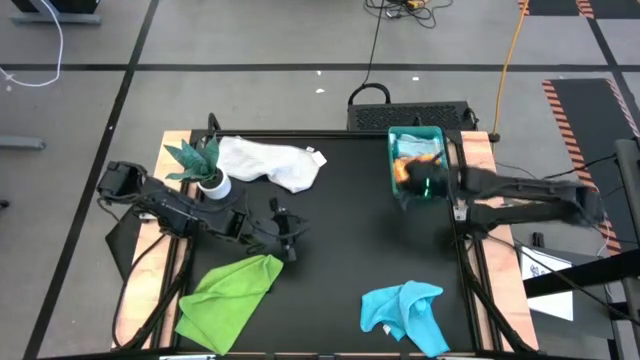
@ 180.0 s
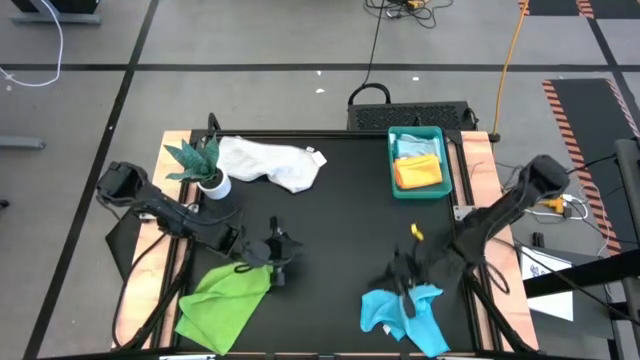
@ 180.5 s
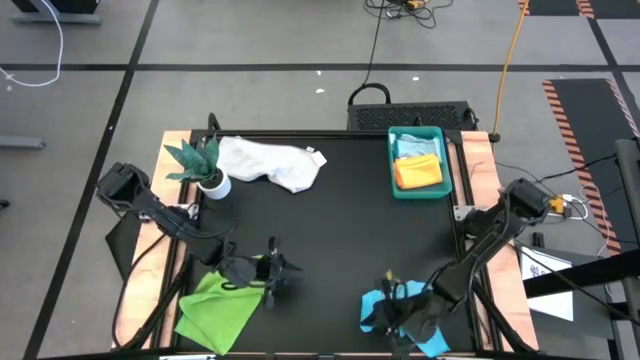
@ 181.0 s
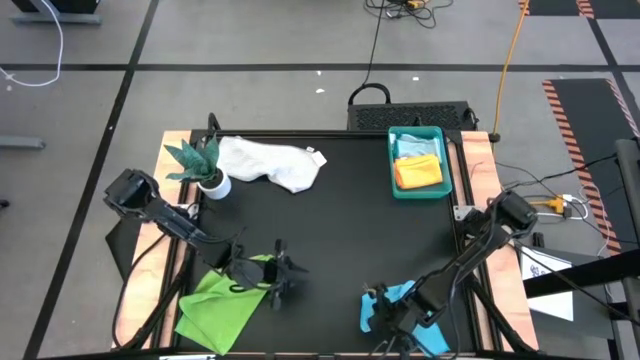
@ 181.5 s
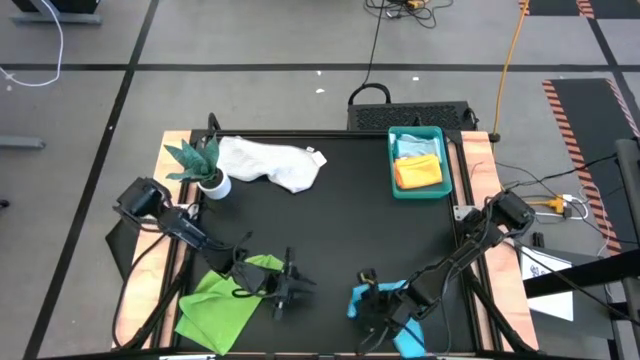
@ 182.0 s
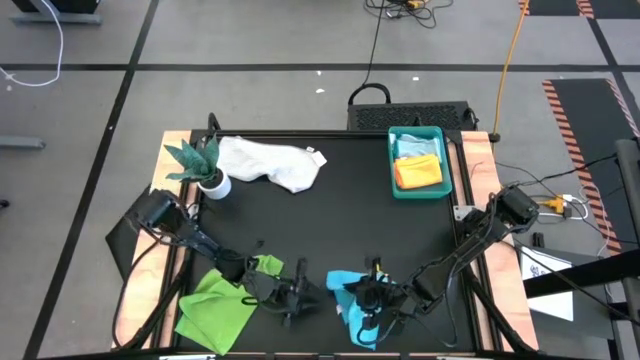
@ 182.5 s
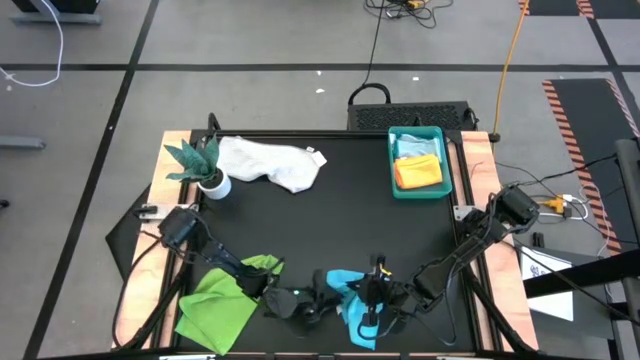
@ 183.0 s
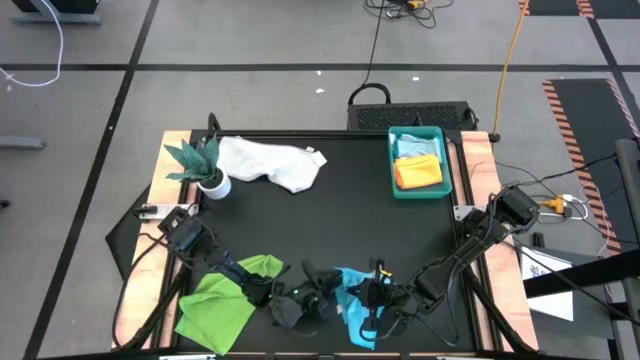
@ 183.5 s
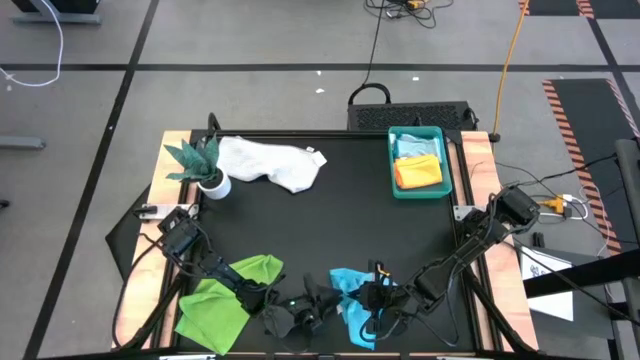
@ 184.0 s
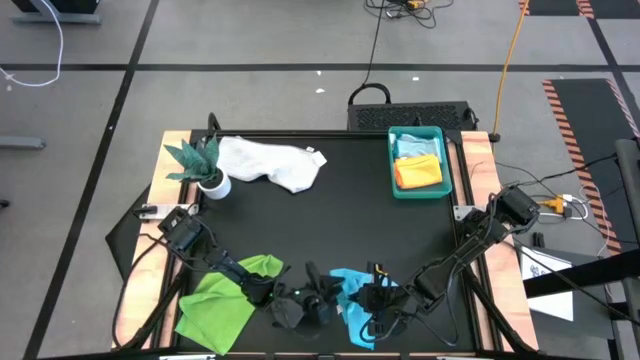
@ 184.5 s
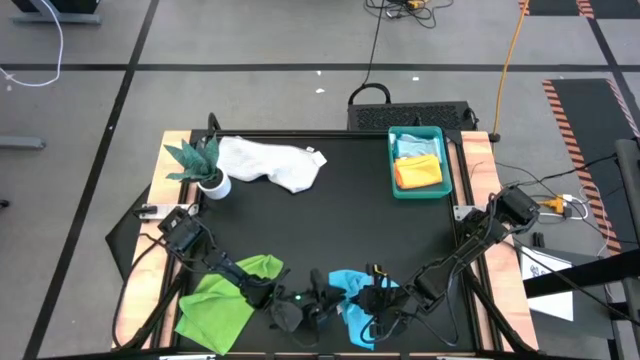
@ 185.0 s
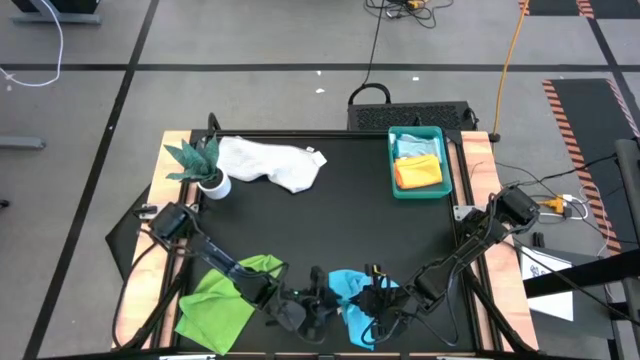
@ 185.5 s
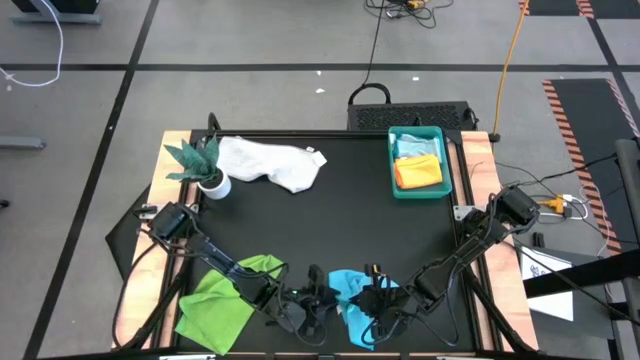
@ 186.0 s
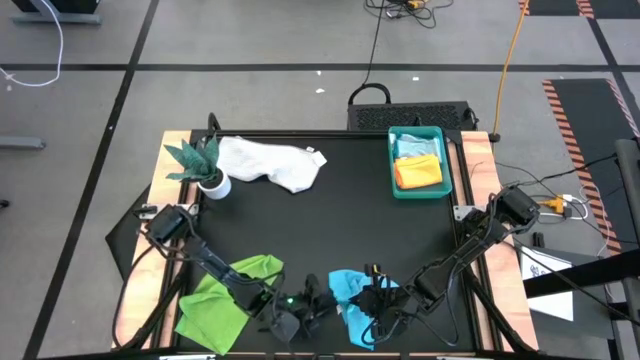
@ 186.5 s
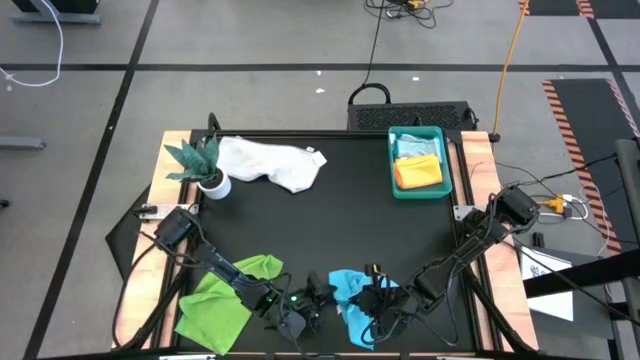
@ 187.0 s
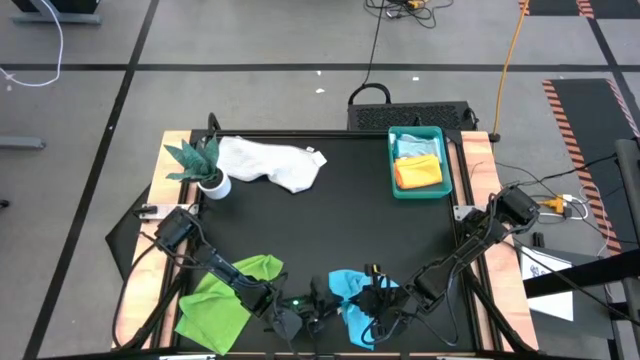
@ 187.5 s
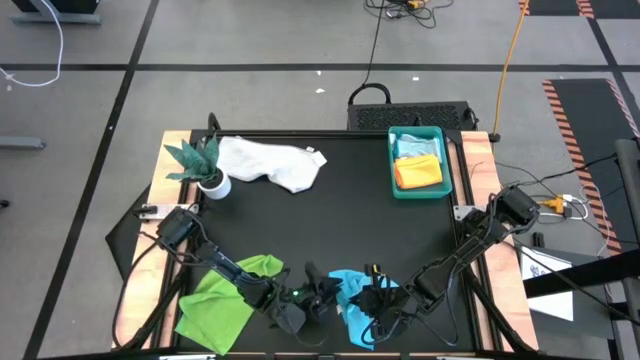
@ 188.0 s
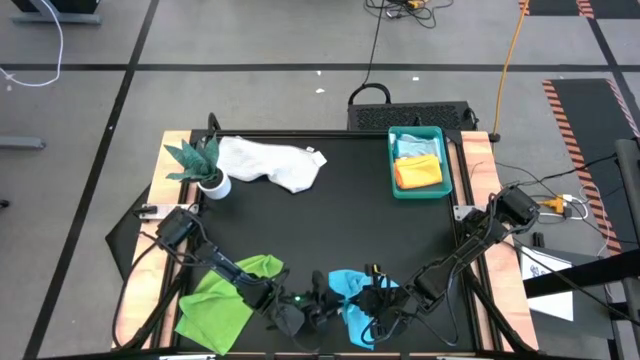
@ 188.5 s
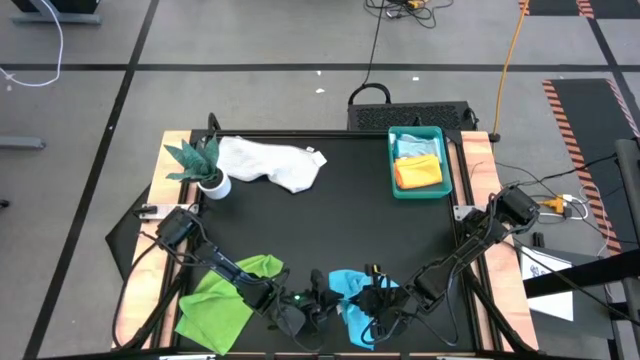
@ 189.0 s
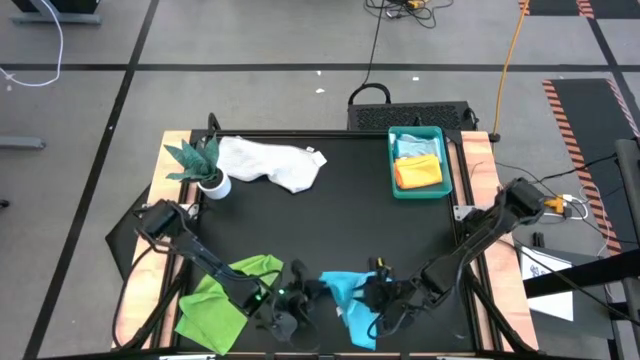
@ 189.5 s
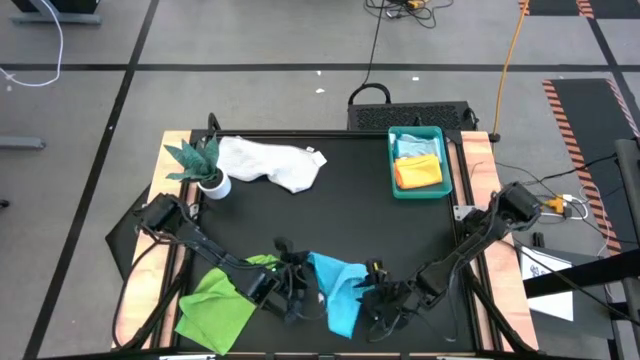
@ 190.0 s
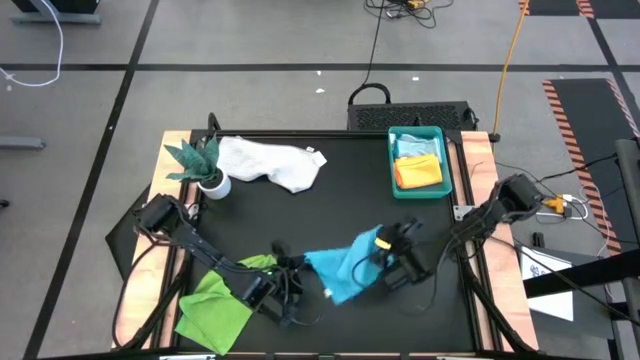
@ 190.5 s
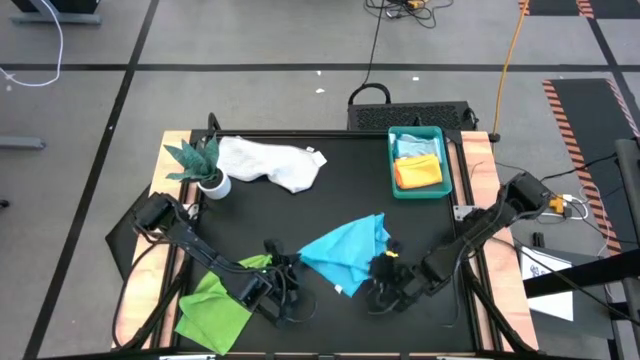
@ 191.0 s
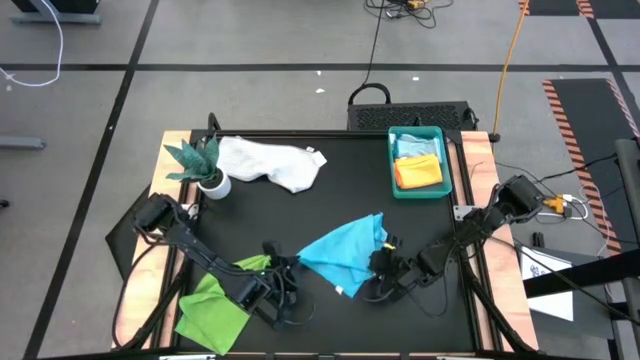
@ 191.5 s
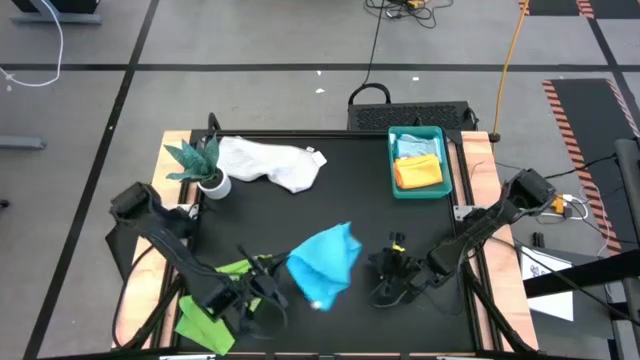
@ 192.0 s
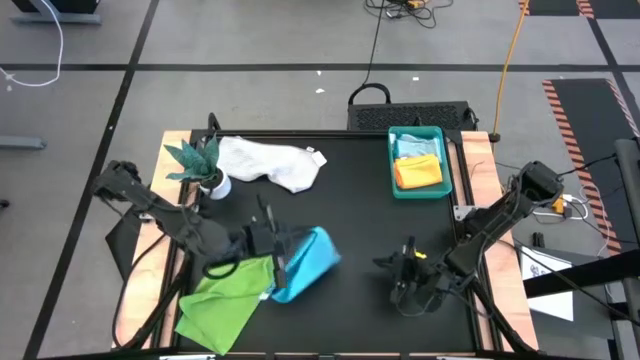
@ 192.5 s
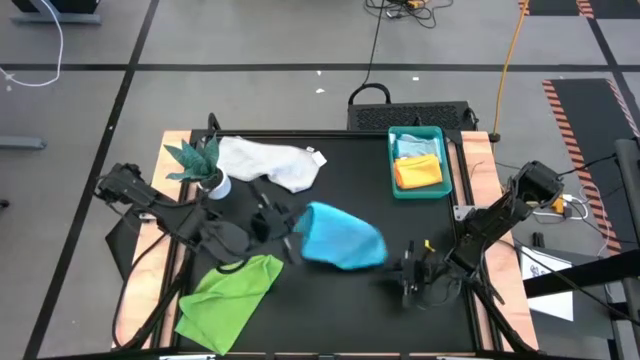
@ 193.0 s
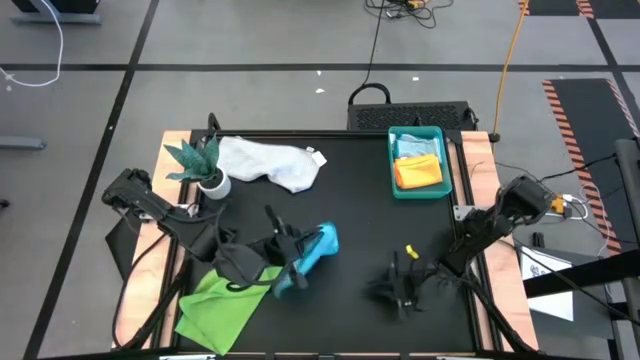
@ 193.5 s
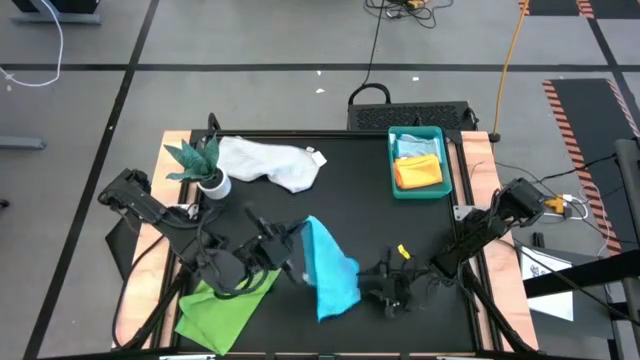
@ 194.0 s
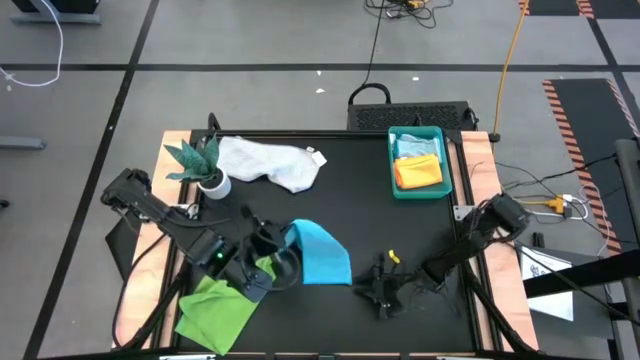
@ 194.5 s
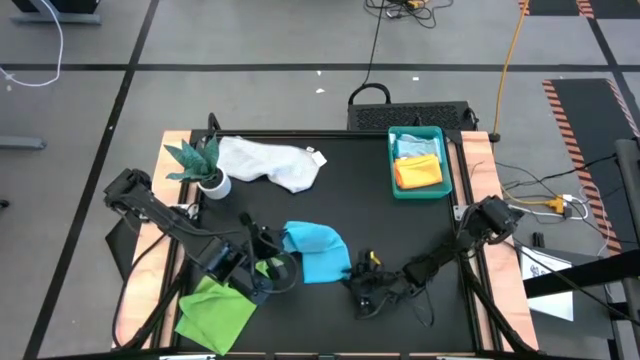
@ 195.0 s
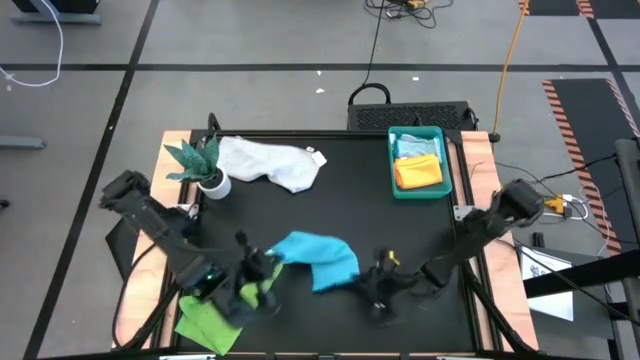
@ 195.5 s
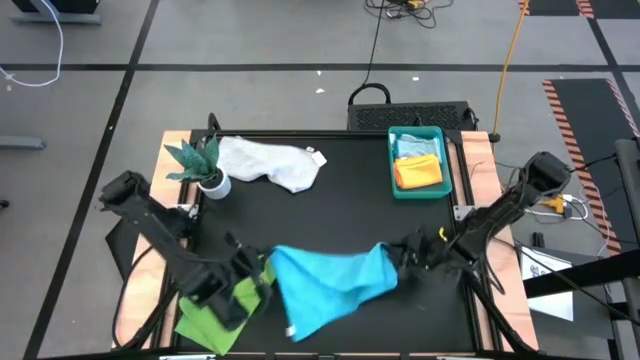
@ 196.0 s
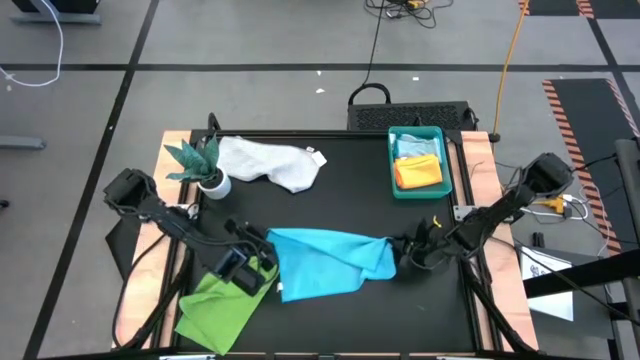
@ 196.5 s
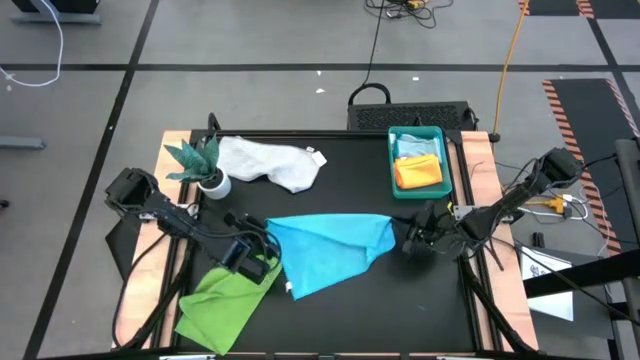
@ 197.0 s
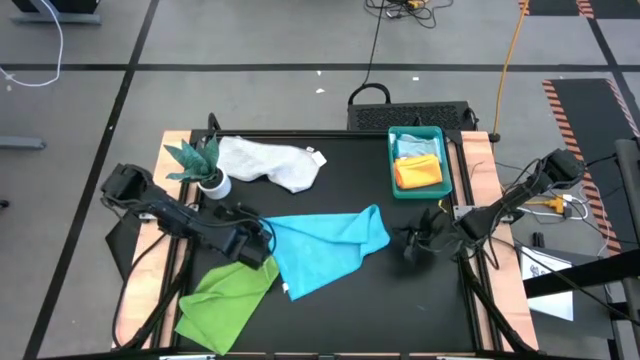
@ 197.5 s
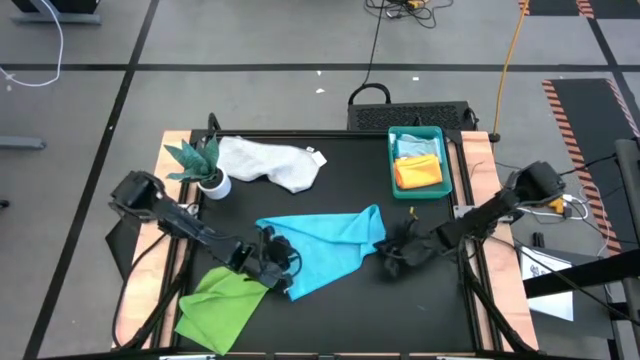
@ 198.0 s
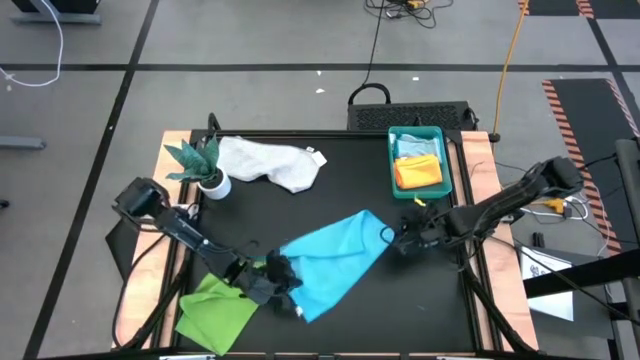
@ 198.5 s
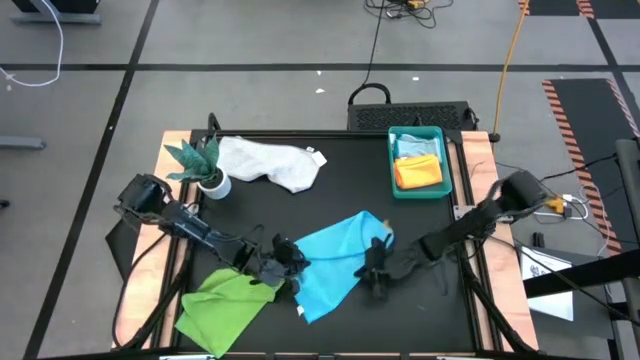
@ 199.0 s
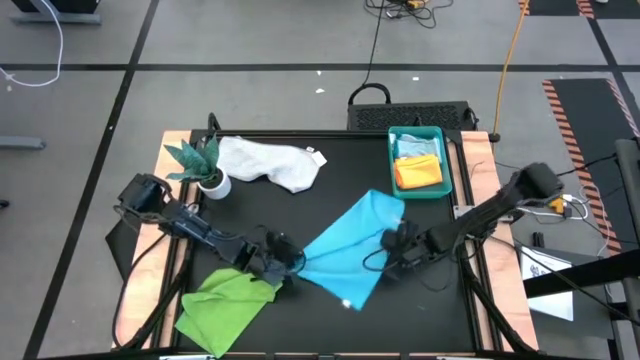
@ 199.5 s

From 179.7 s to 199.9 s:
Task: Fold microfiber towels
Fold the blue microfiber cloth

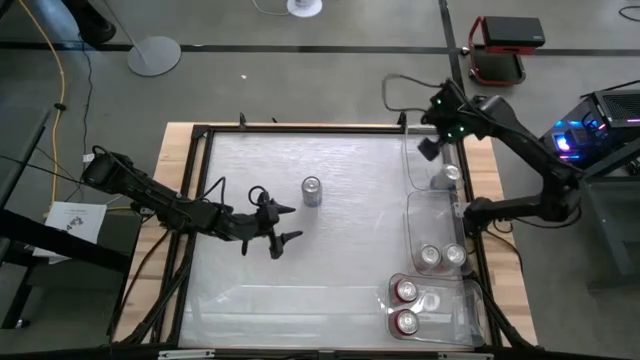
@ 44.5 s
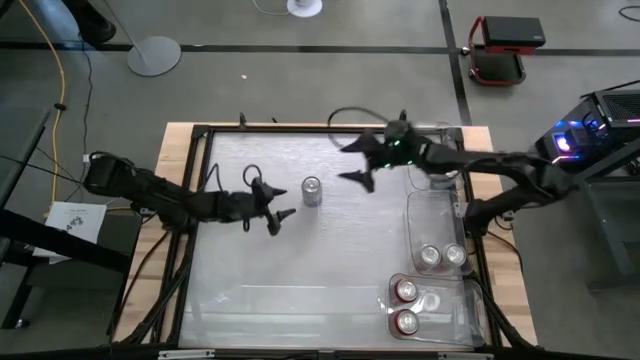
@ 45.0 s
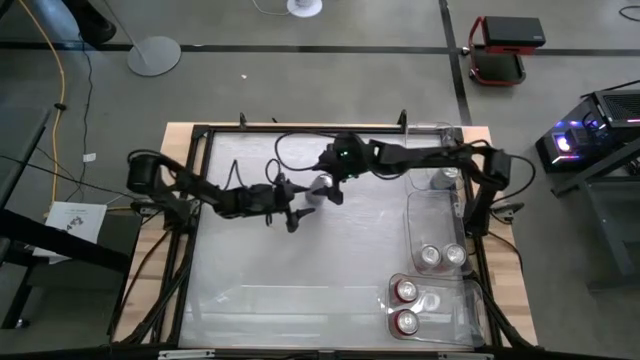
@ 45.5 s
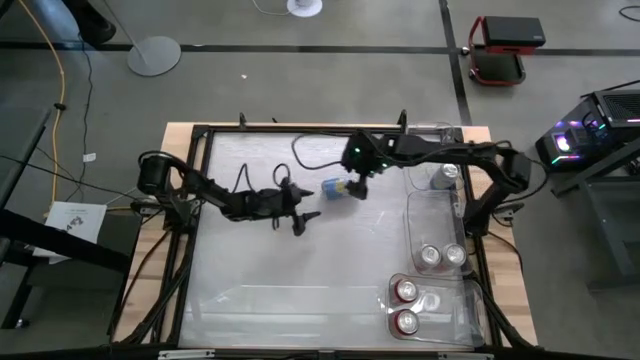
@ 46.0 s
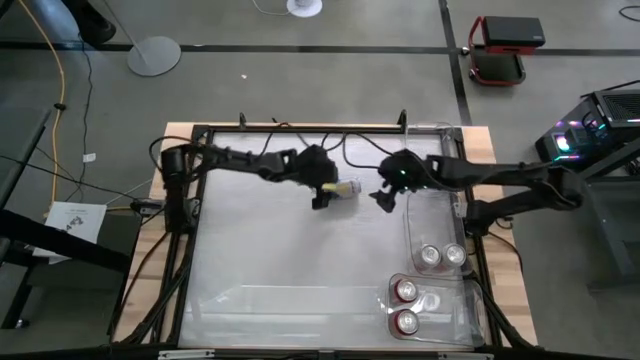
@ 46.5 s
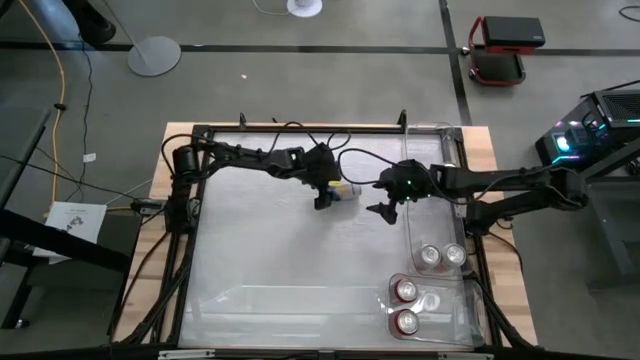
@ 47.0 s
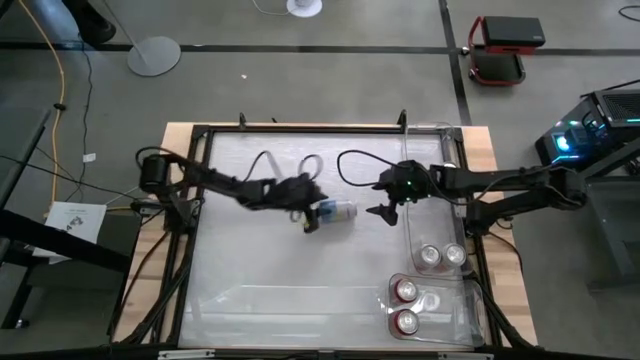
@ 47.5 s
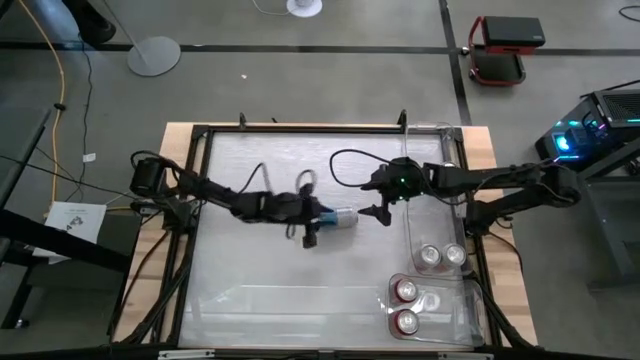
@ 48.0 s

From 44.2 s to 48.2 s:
Task: Sort soda cans
Put the blue-white soda can into the top transparent bin
